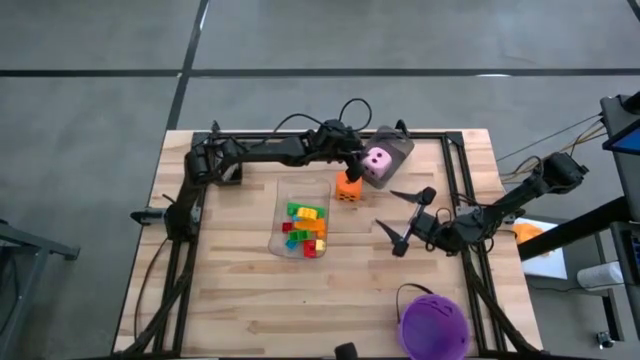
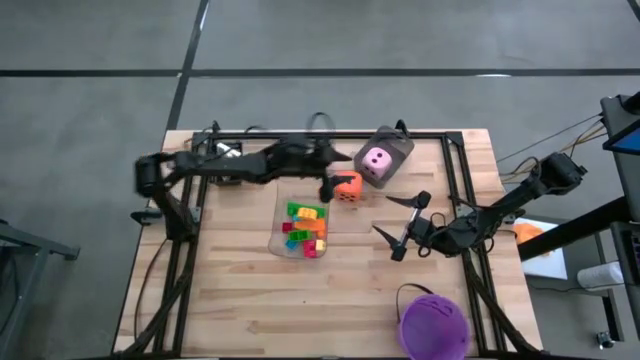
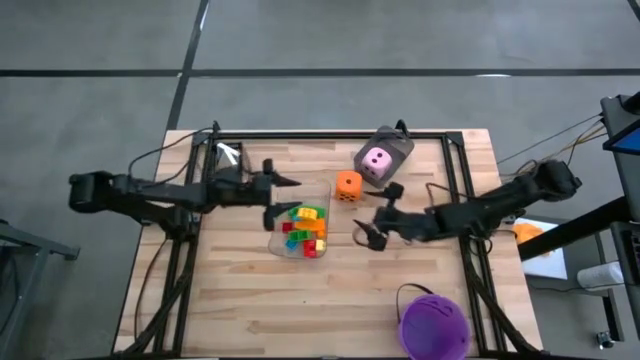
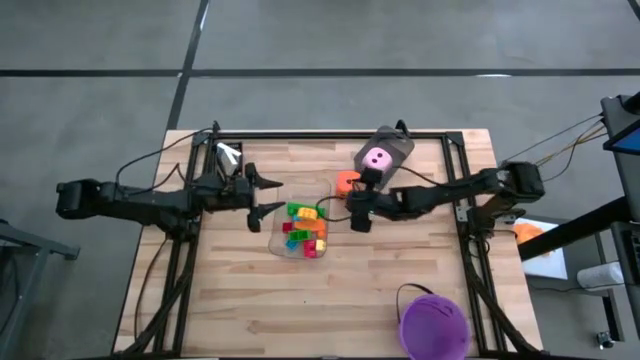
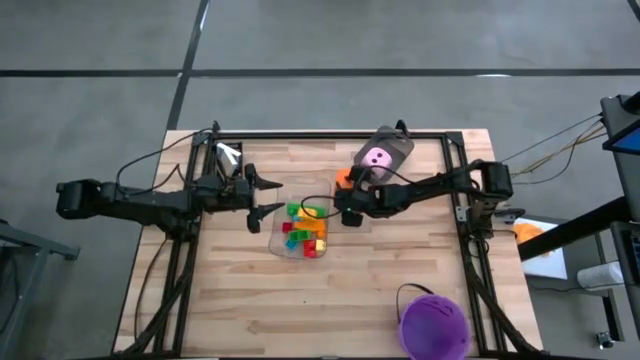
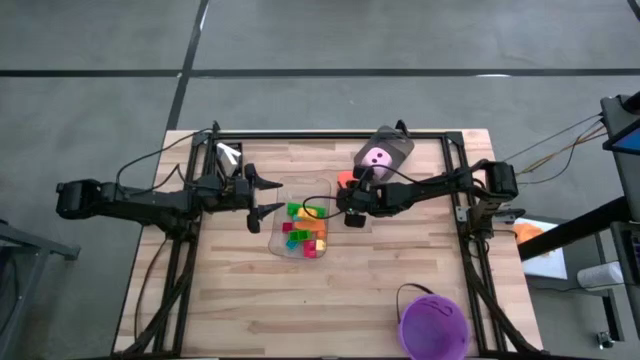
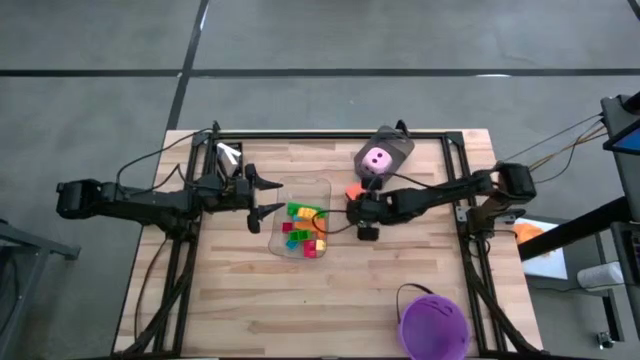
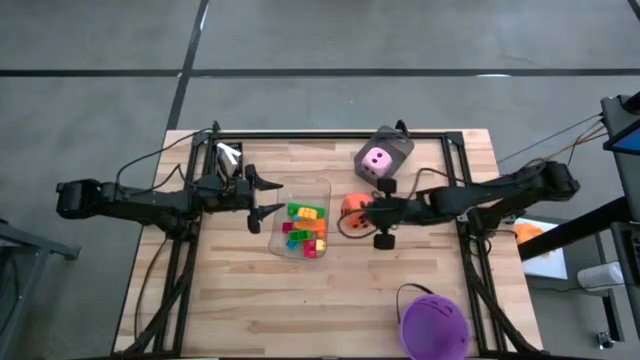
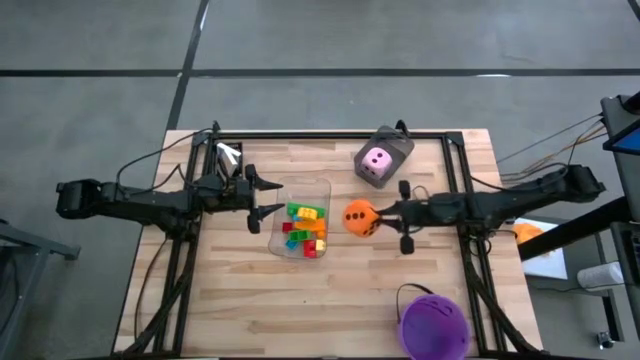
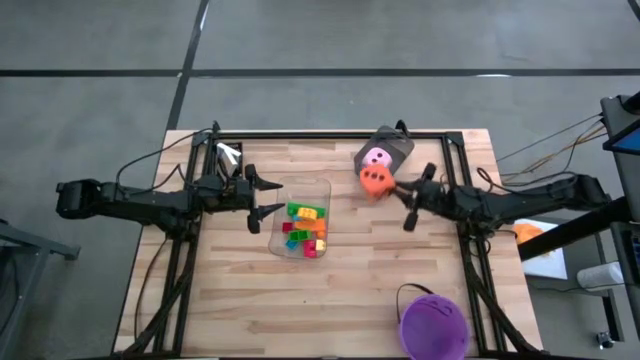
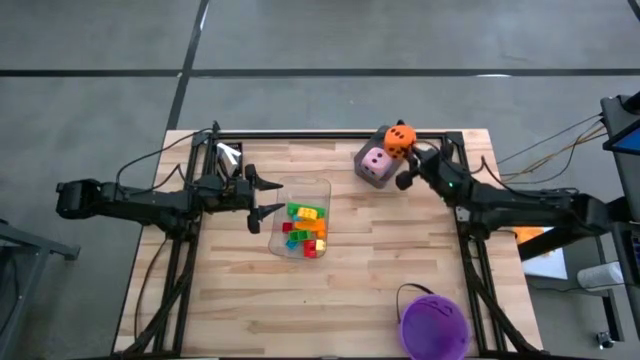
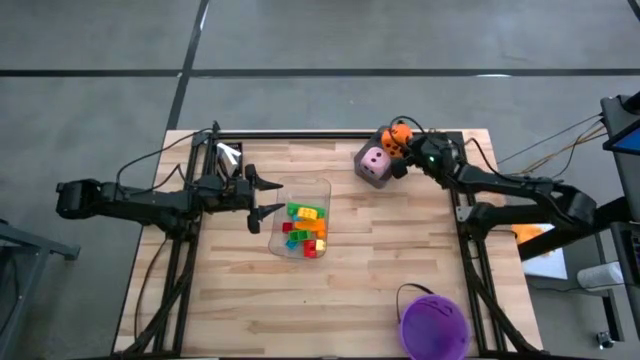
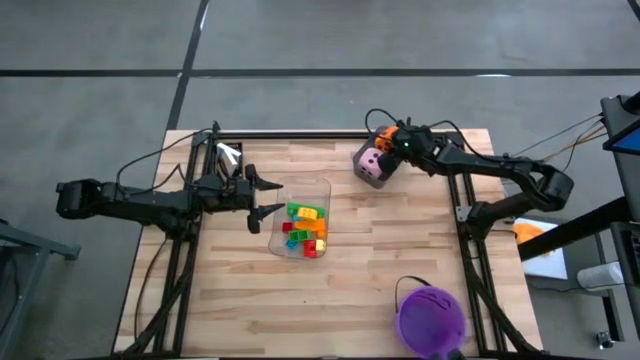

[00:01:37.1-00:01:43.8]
Task: Pick & Place Toys
Put the orange dice into the black bin

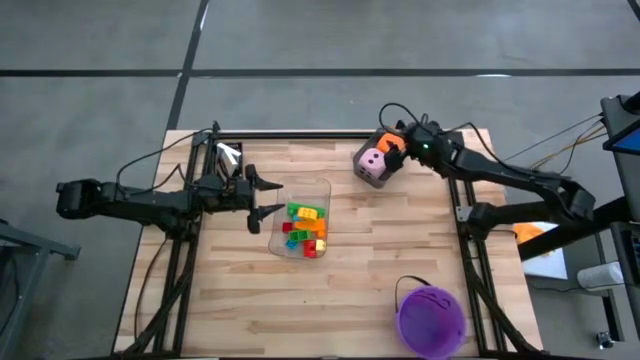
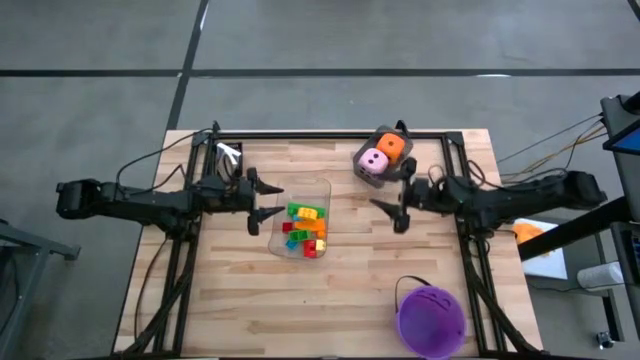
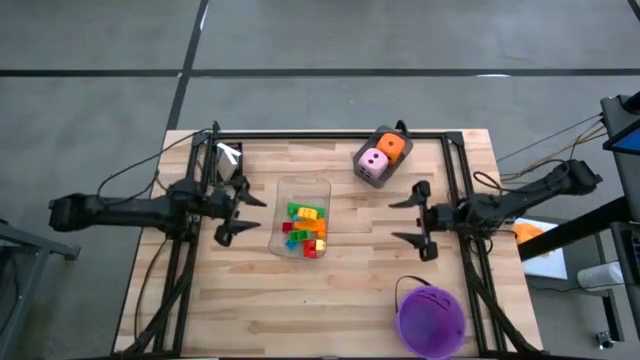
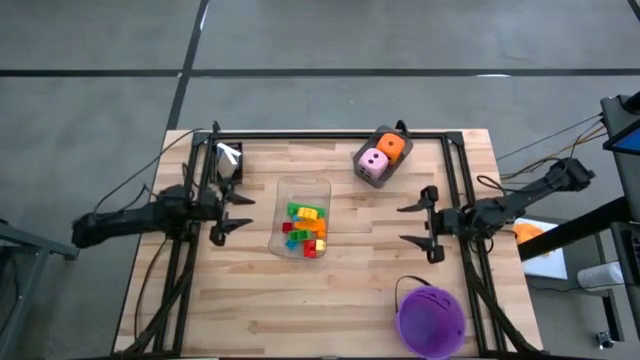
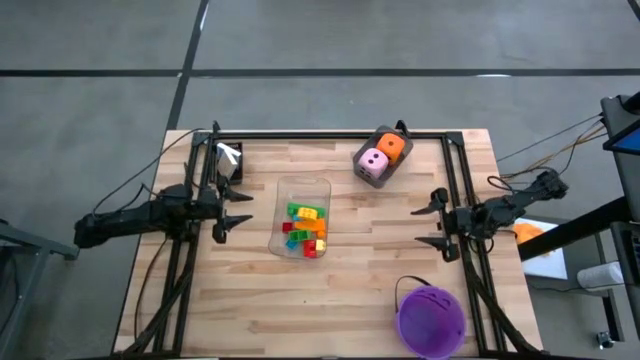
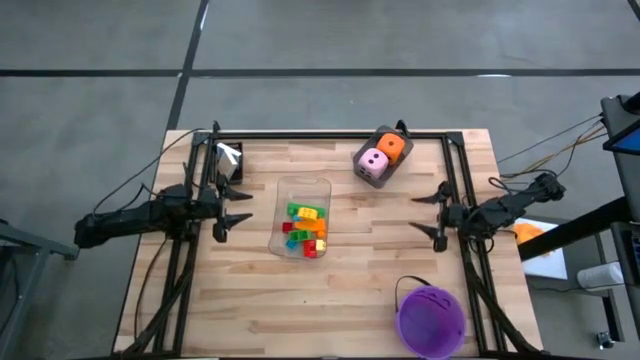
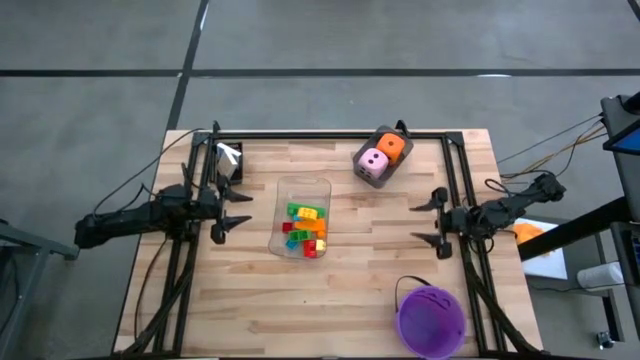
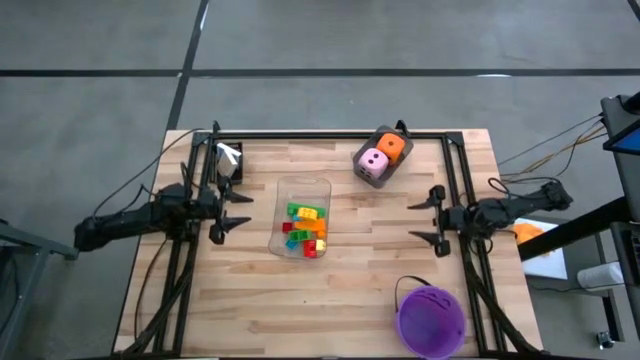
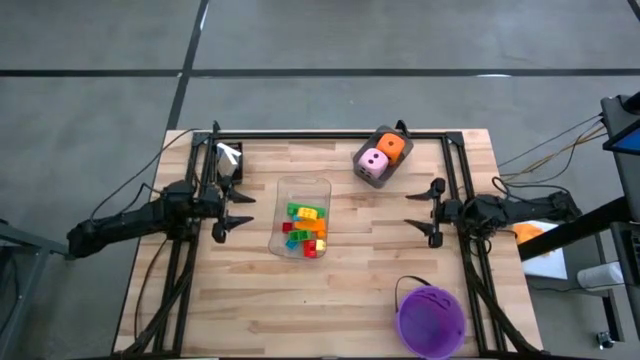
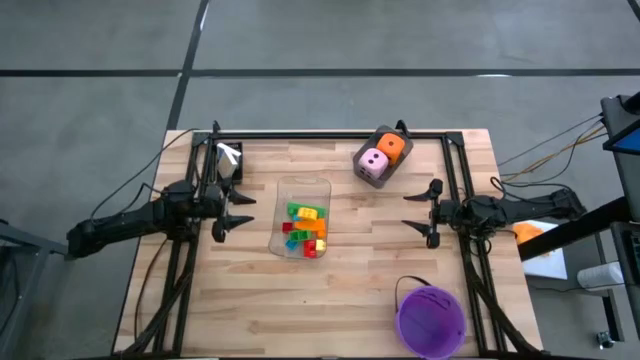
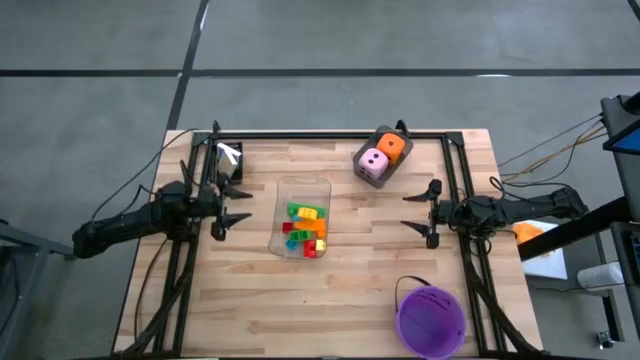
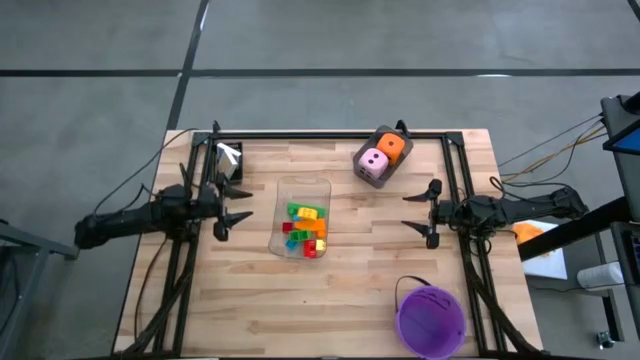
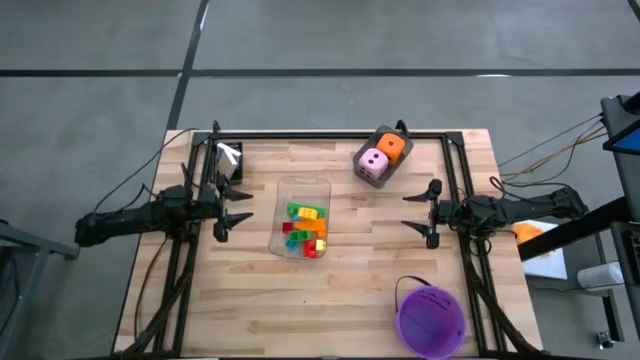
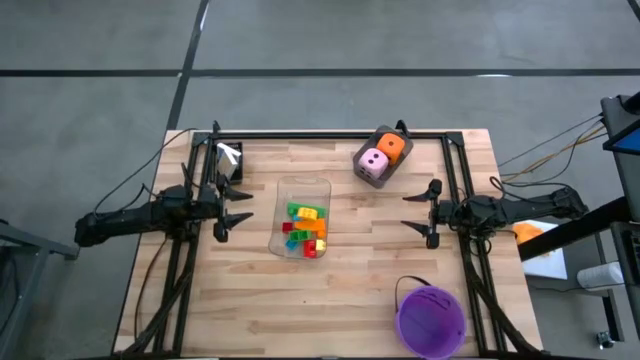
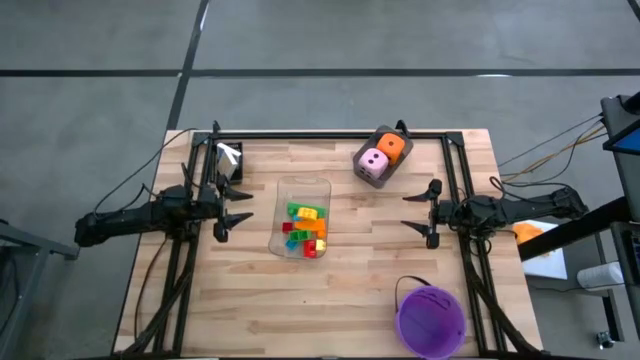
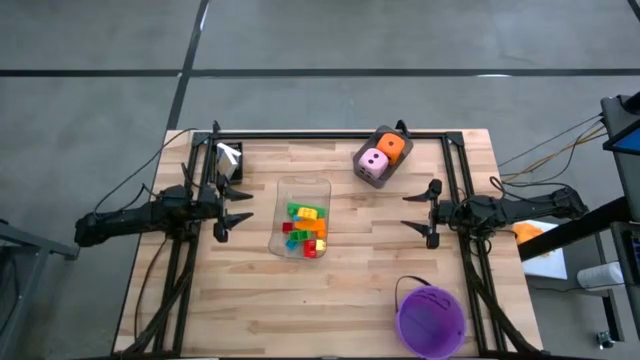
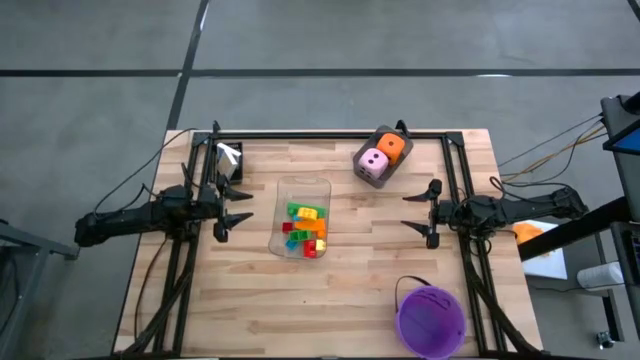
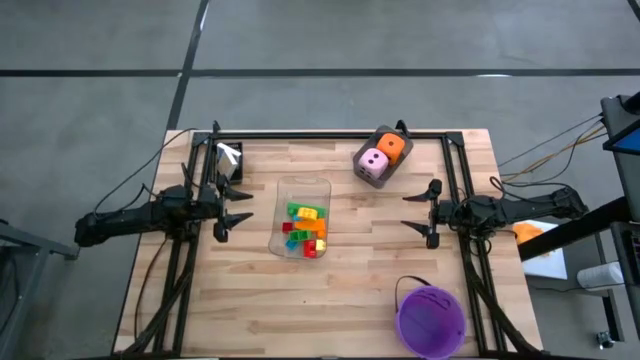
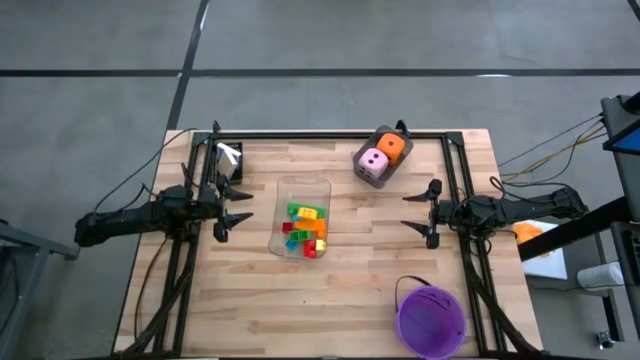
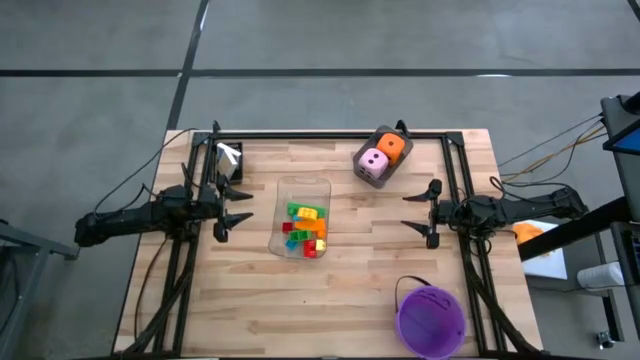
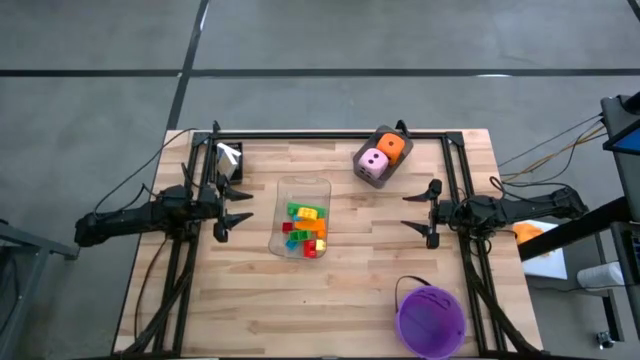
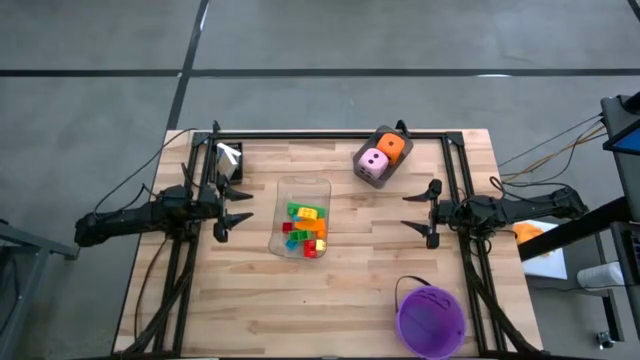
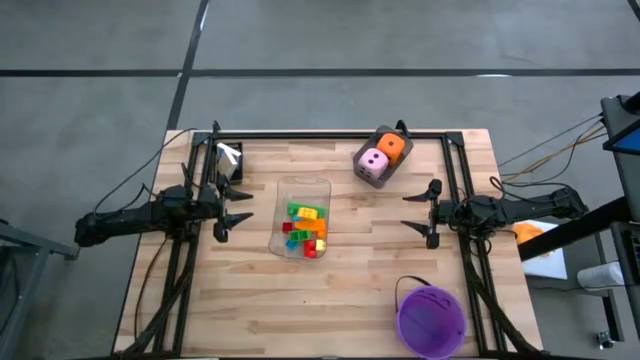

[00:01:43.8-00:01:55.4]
Return to Home Position

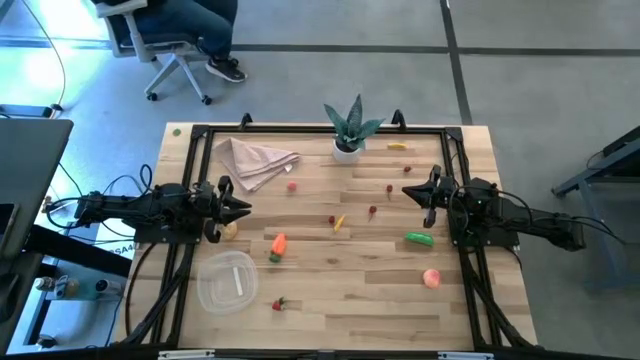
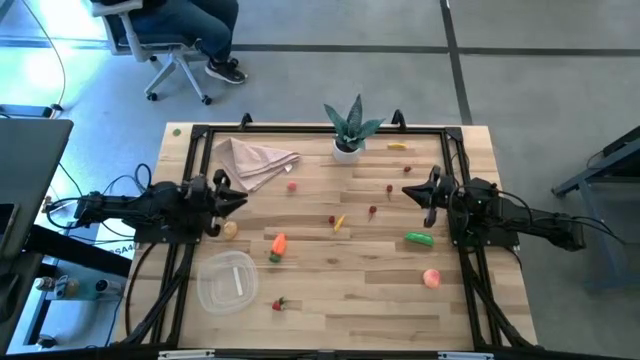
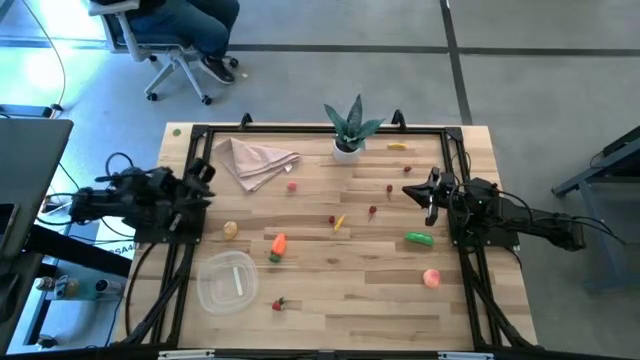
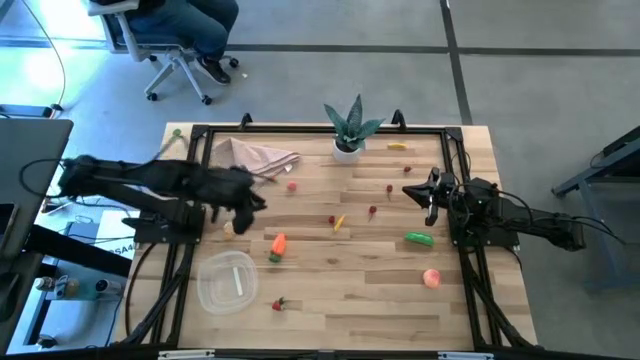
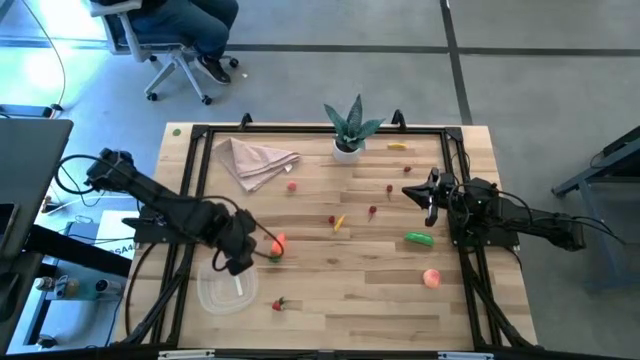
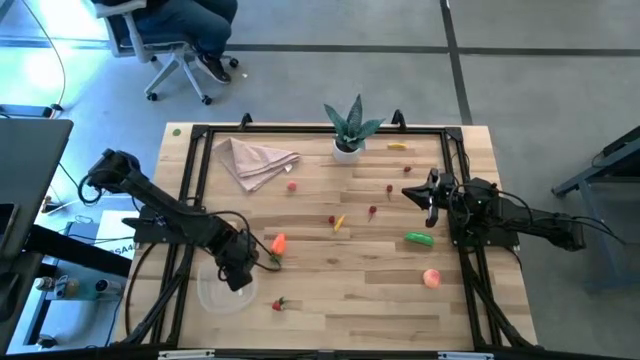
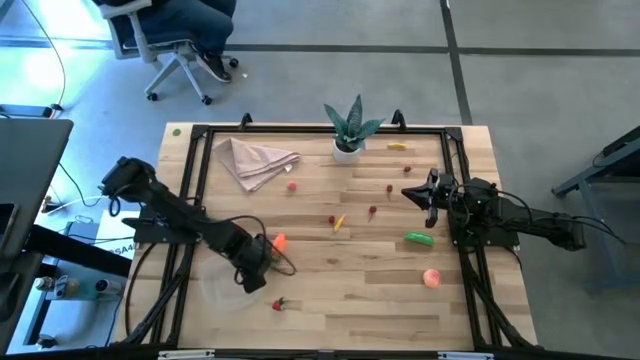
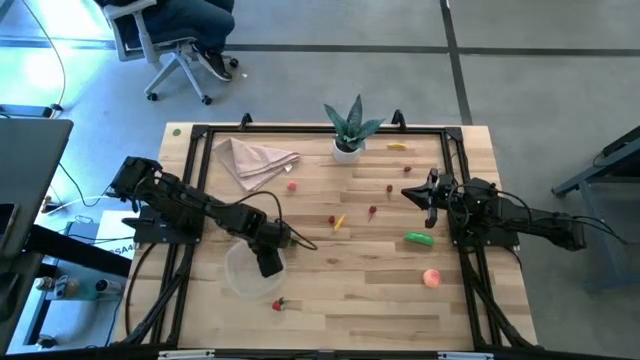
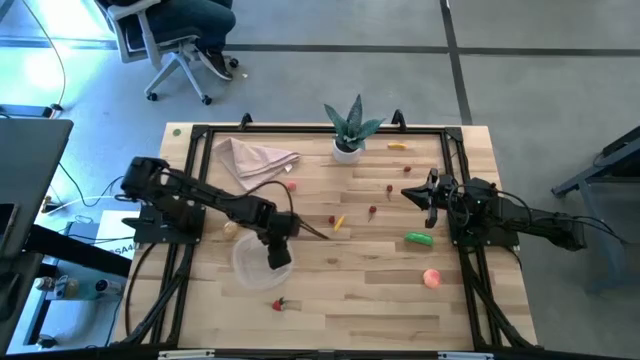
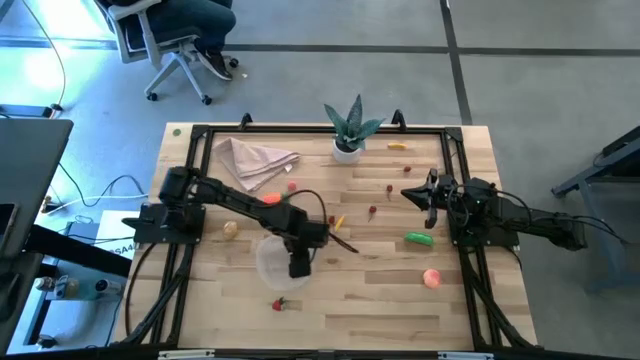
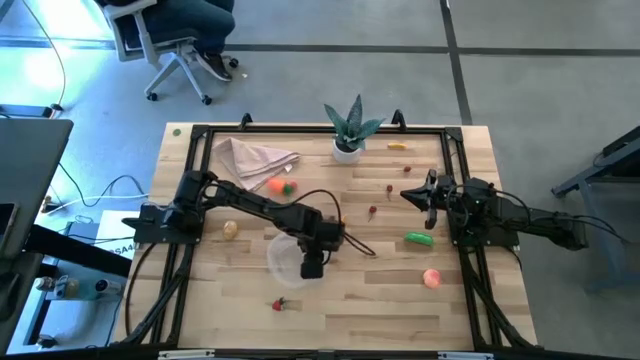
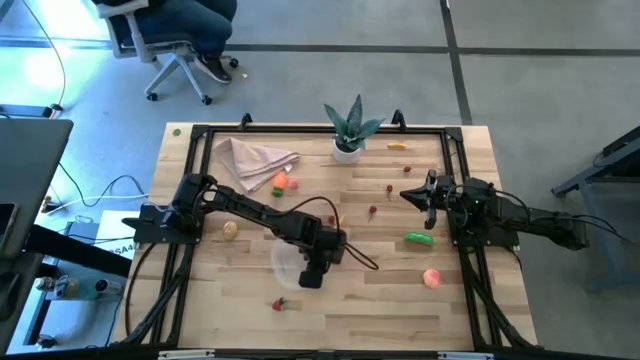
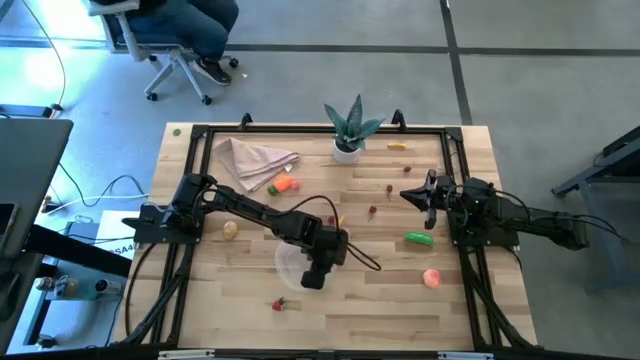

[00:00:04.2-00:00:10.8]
Task: Pick and placing Produce into tupperware
Move the transparent container to the center of the table
